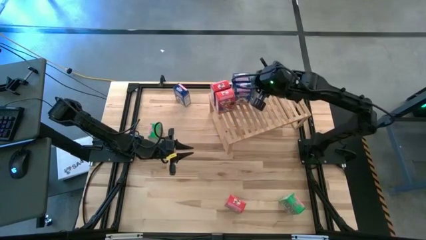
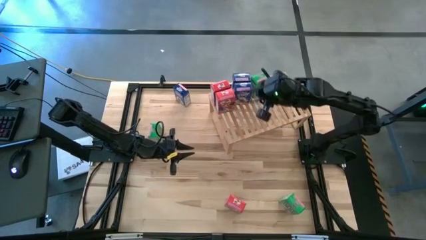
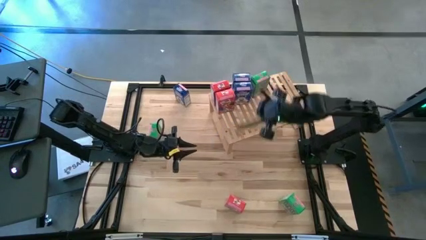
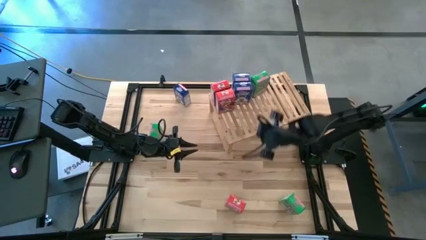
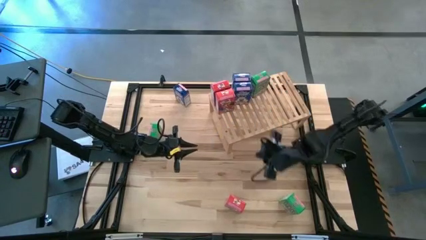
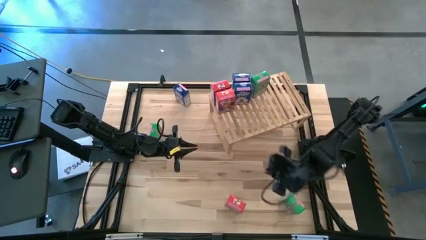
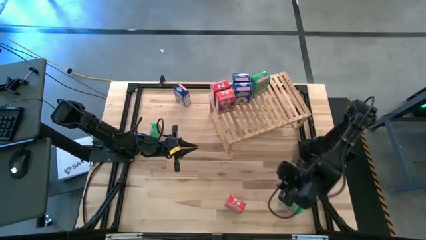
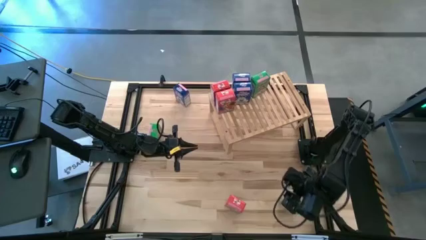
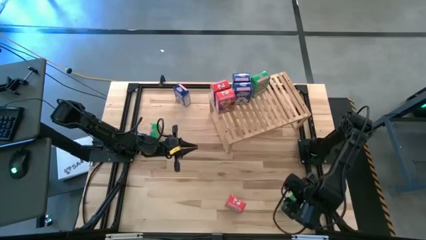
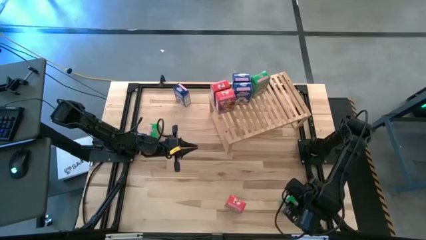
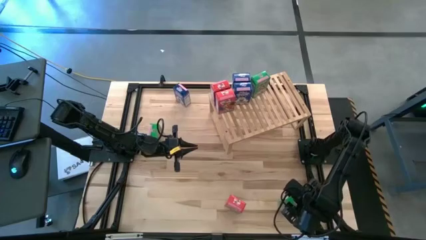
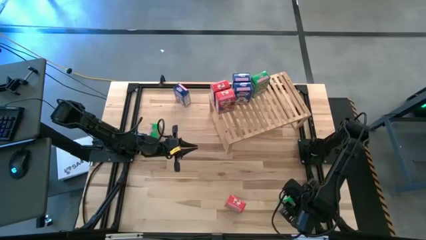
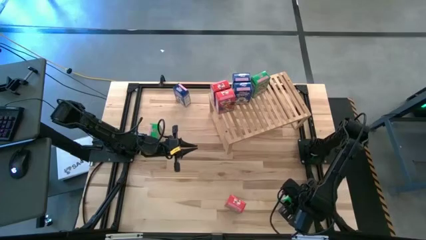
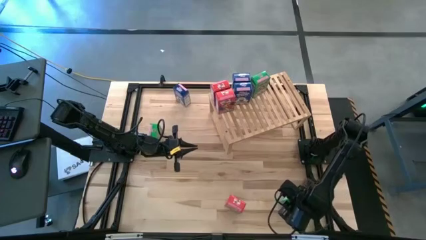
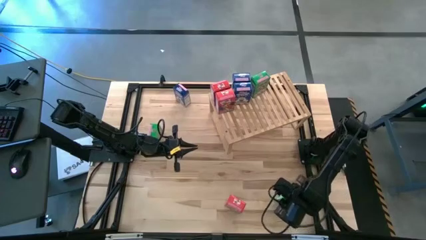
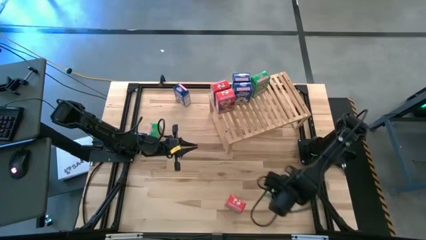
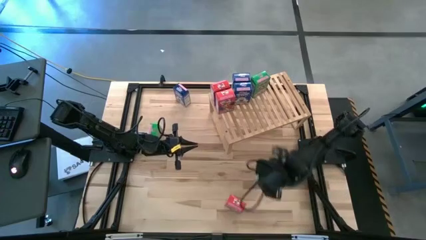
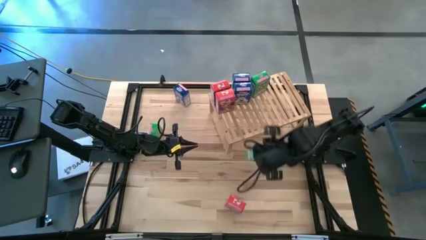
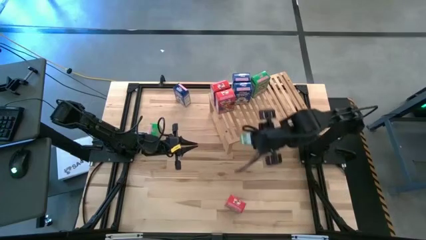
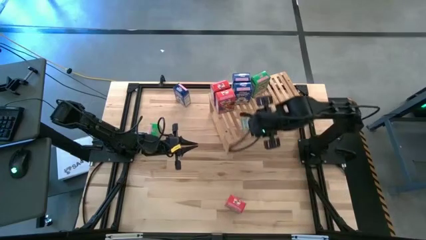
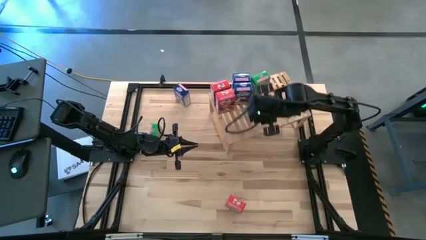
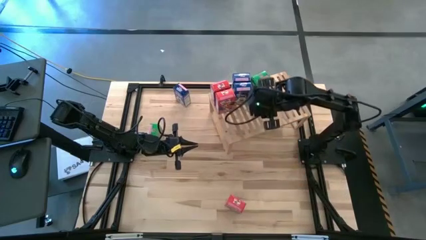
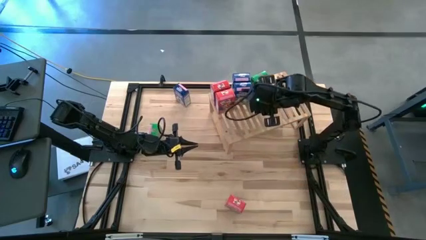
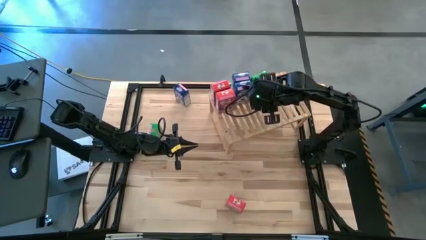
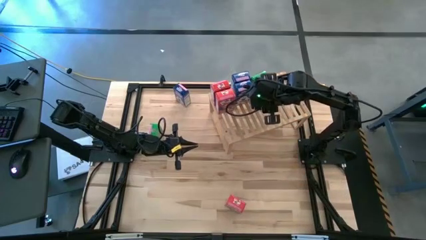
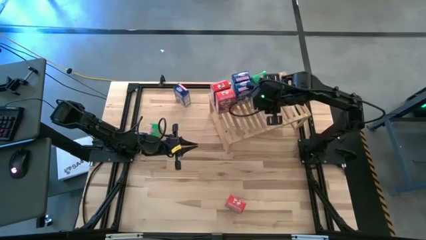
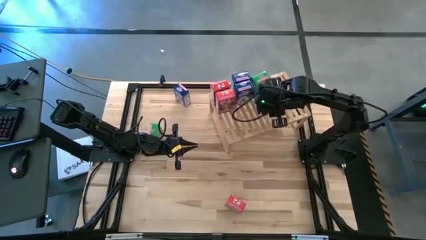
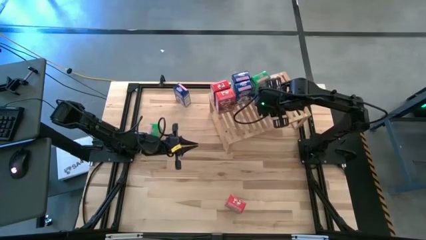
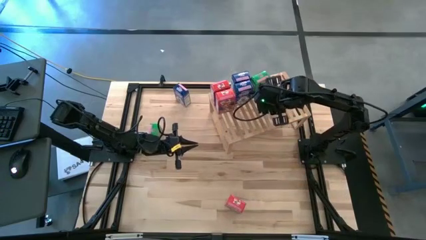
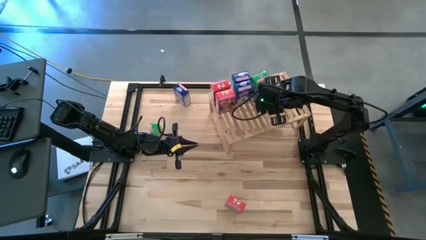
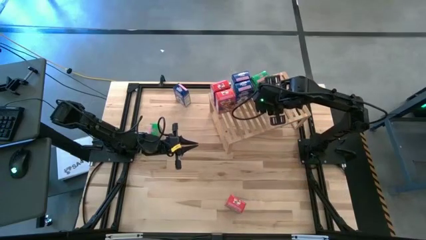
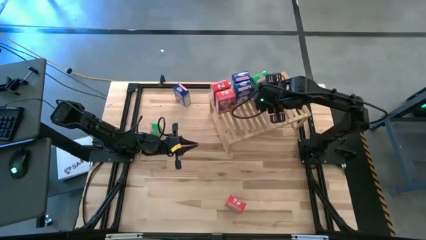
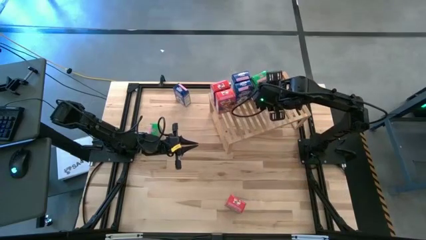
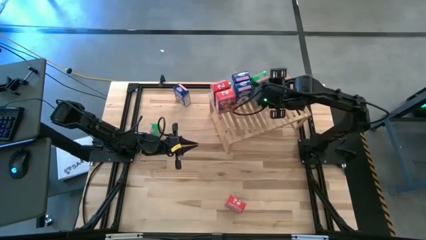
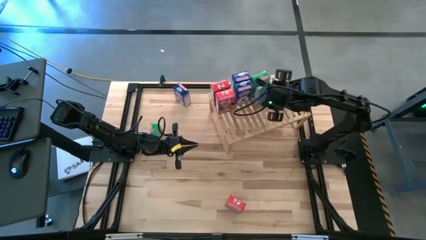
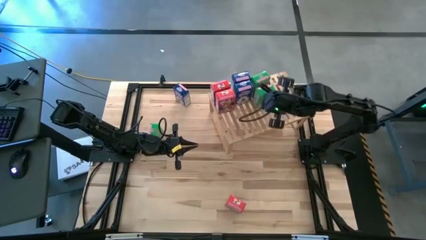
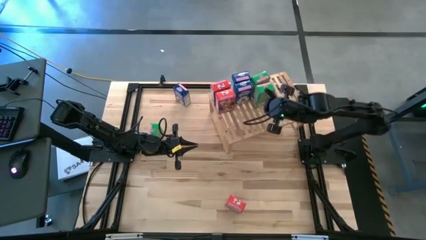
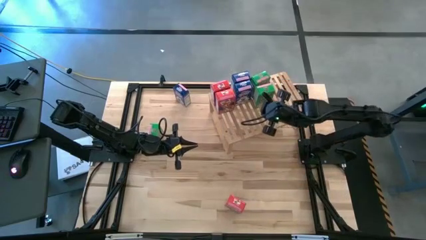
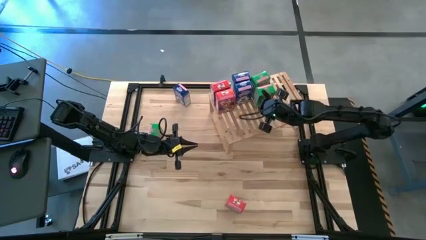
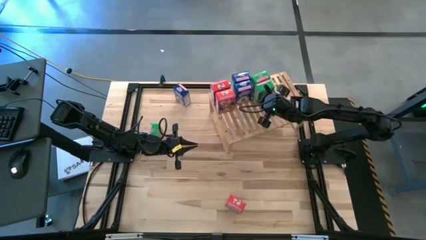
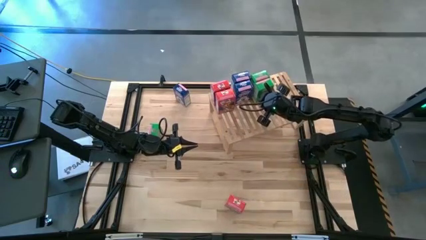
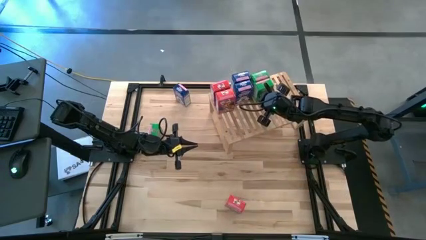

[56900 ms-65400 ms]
Task: Stack cereal on shelf
Put the bottom green cereal box on the shelf aligned with the other green cereal box

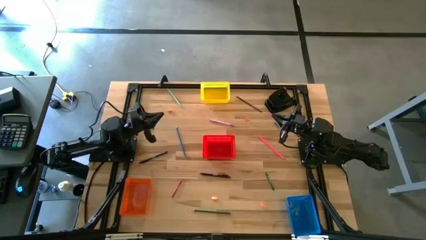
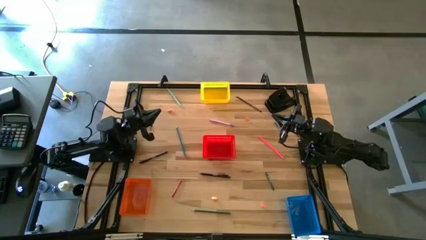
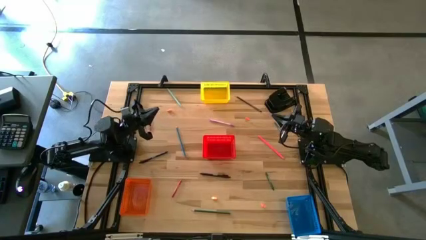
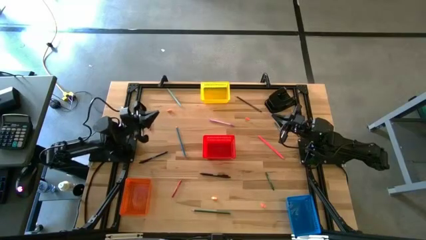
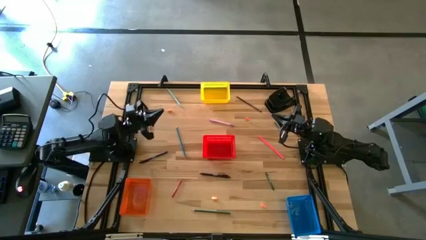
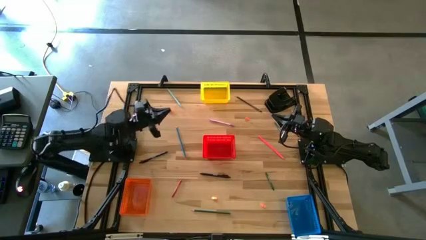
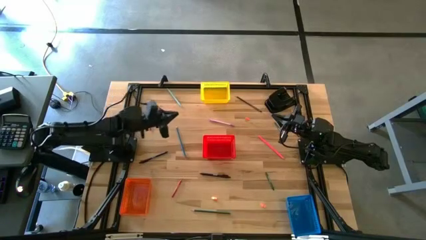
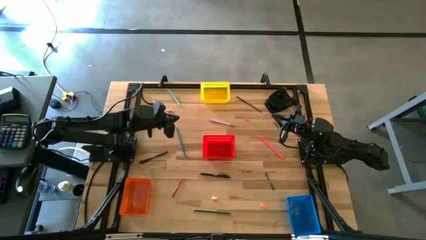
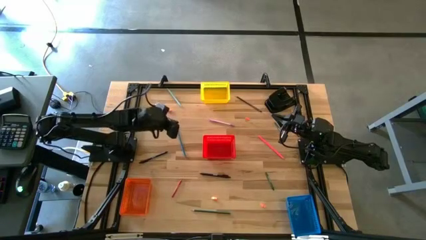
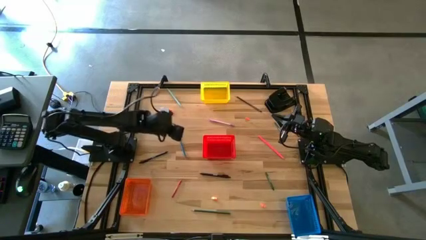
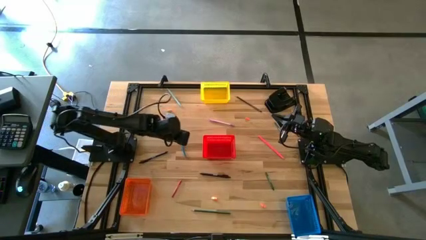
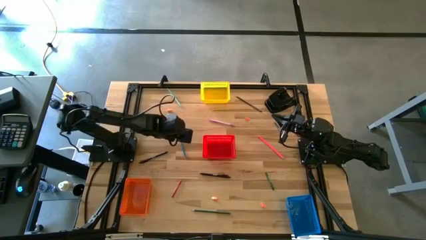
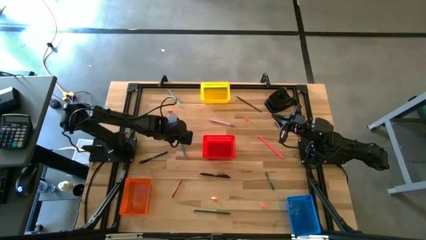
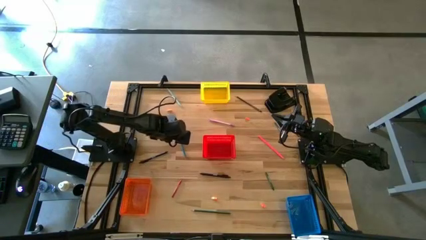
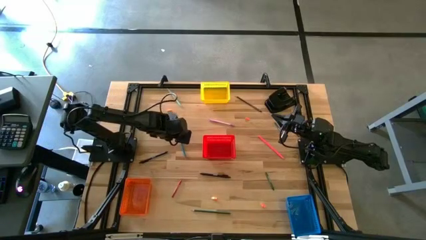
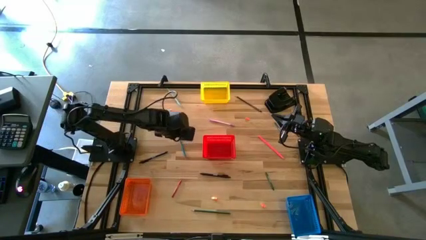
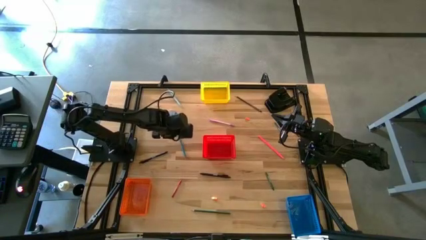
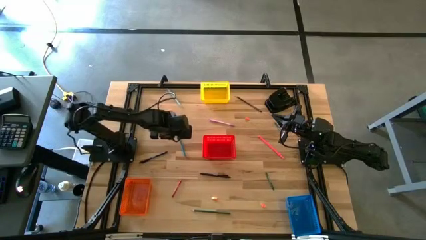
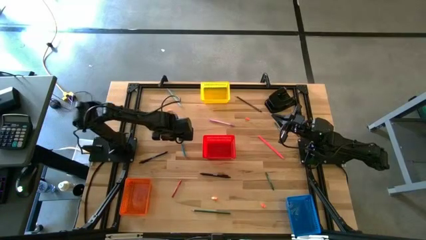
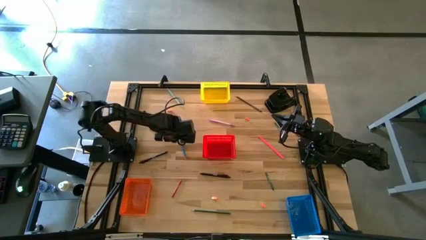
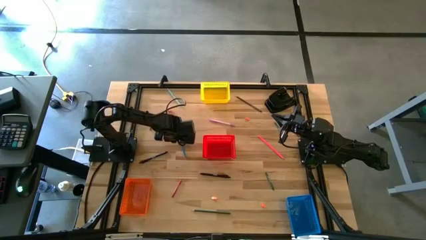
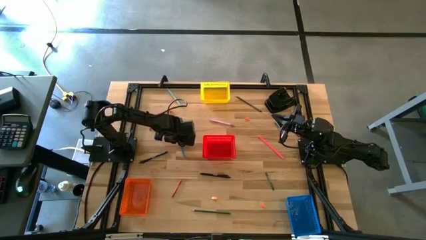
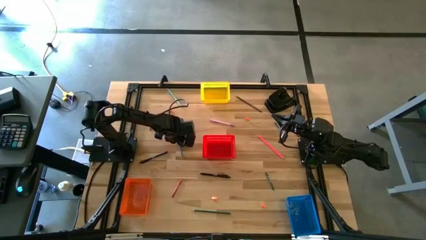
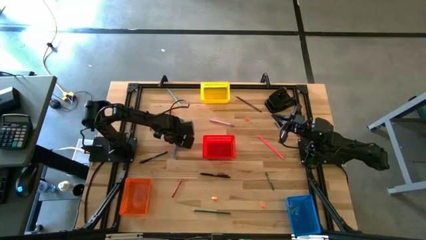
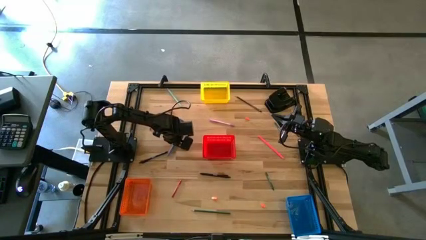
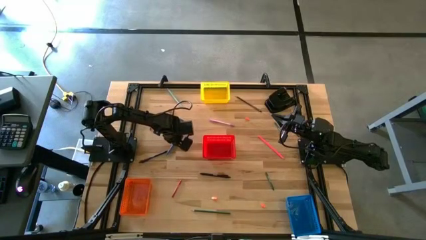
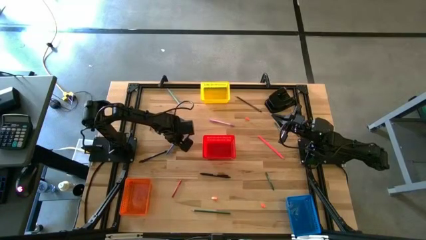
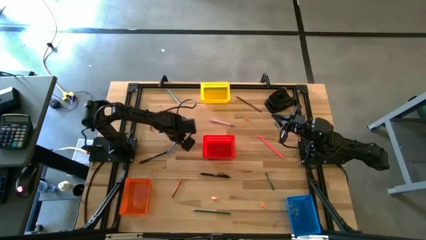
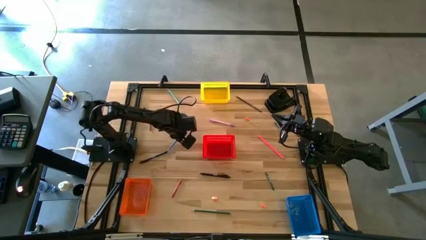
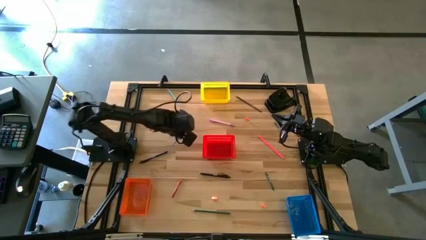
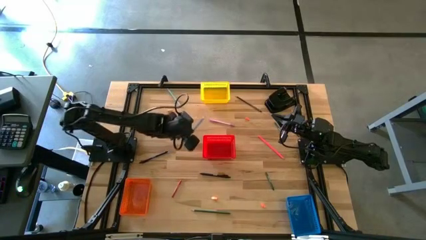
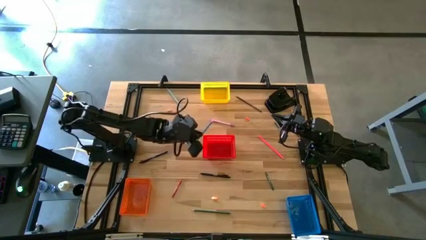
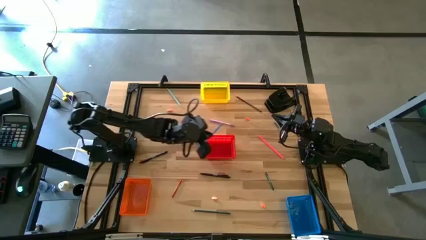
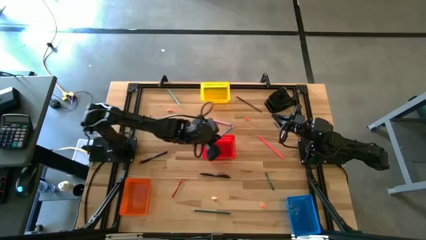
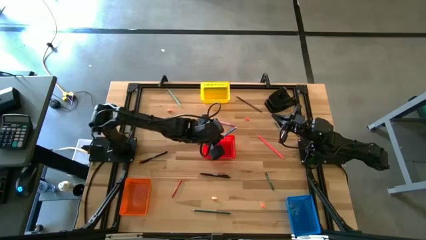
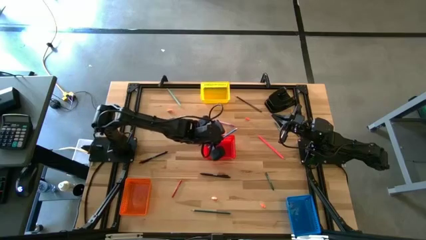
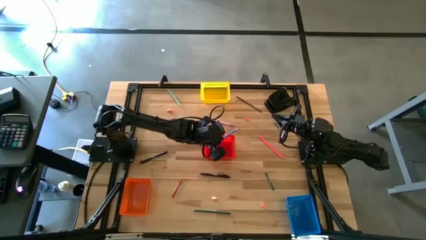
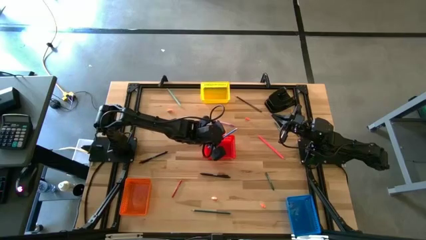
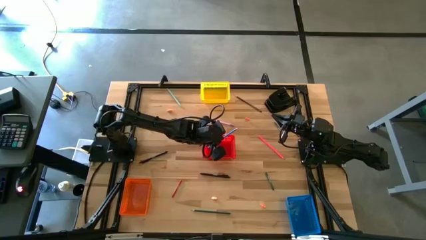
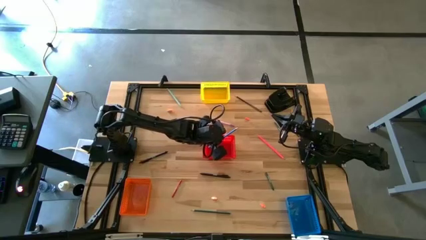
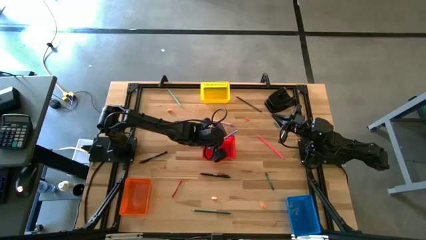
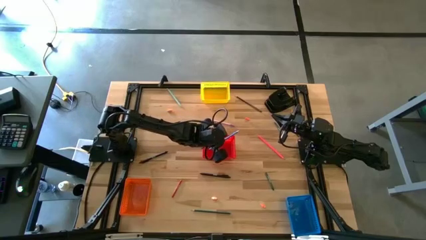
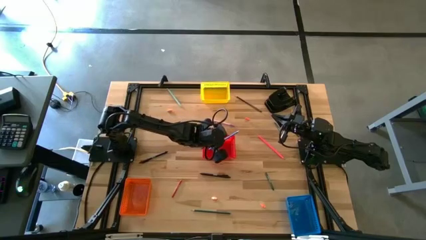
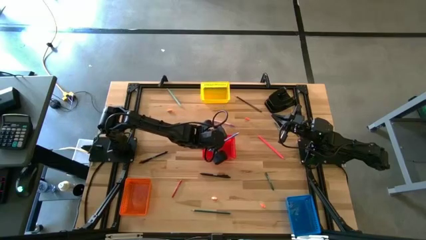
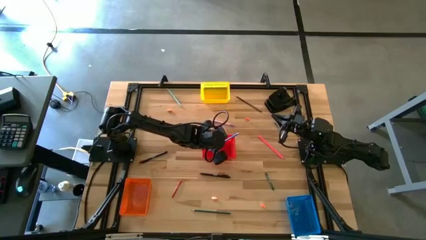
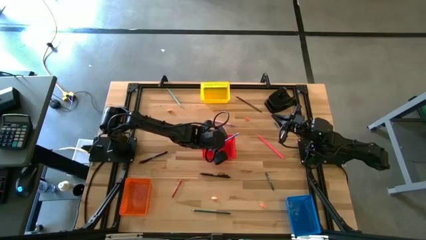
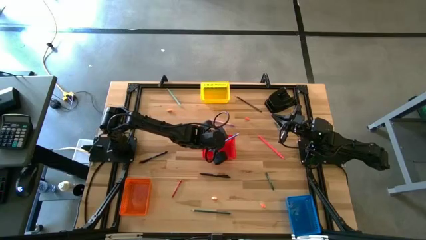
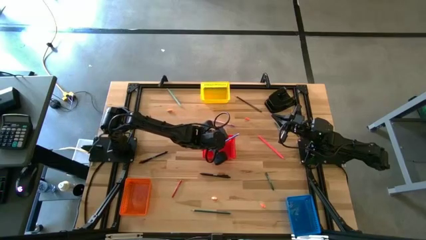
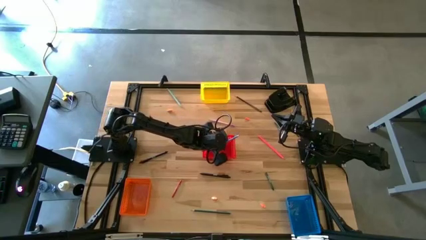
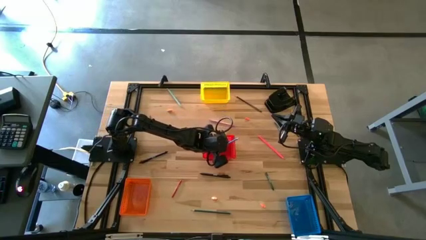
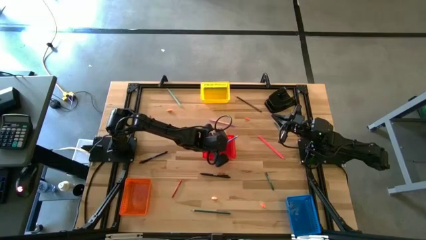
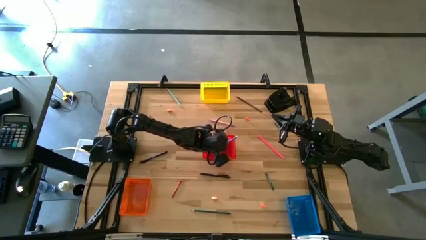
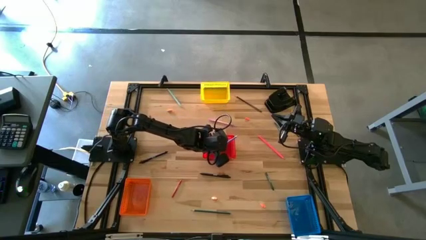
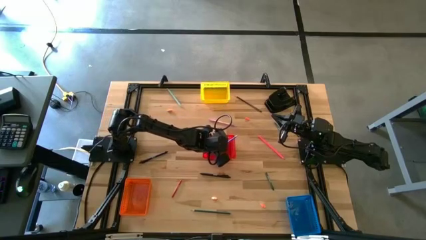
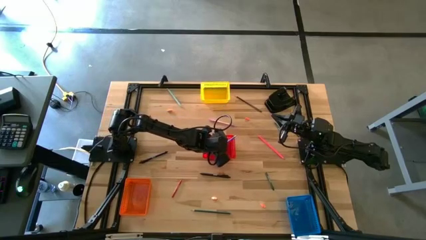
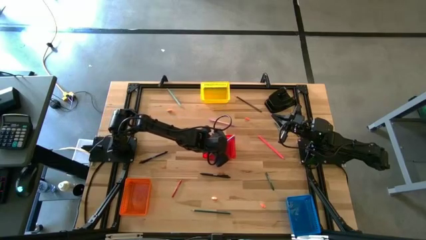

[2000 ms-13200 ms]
Task: Sort crayons/erasers/pens/pencils in bins
Put the blue pencil into the red bin
